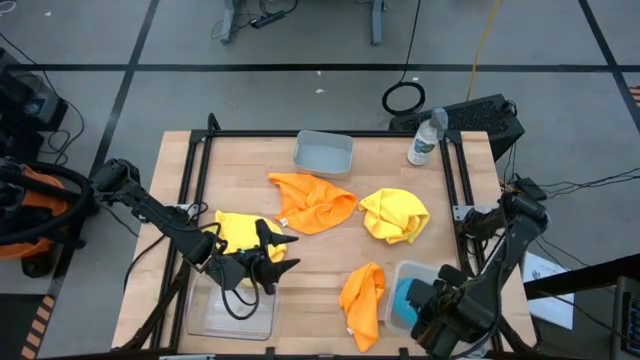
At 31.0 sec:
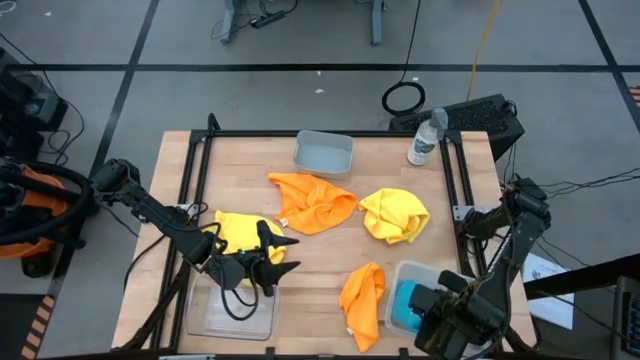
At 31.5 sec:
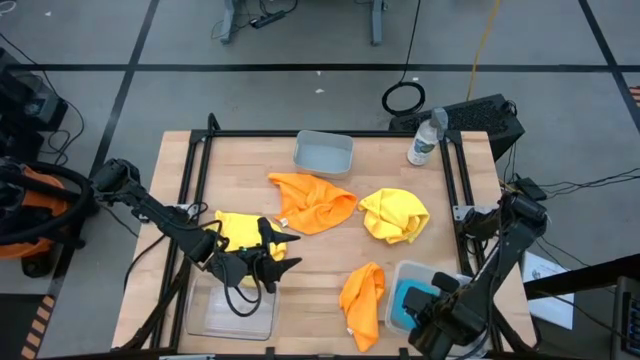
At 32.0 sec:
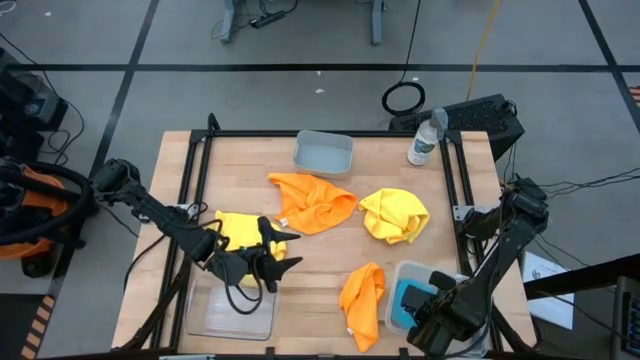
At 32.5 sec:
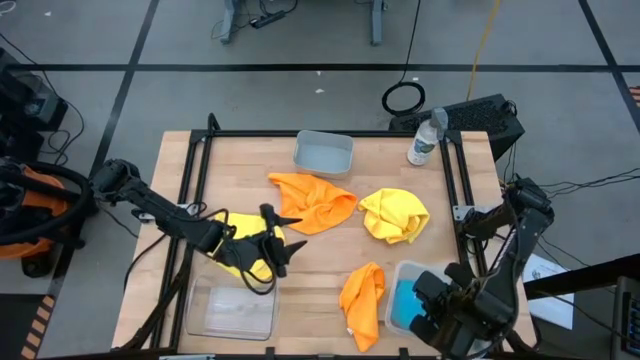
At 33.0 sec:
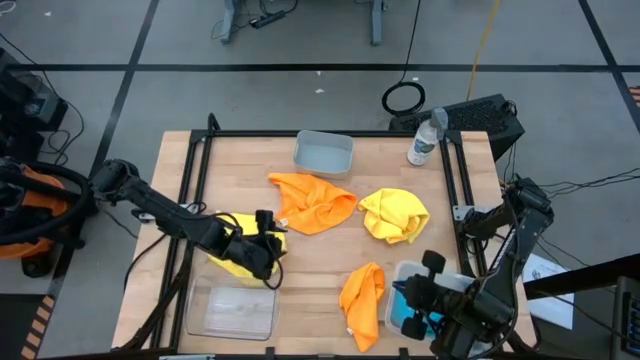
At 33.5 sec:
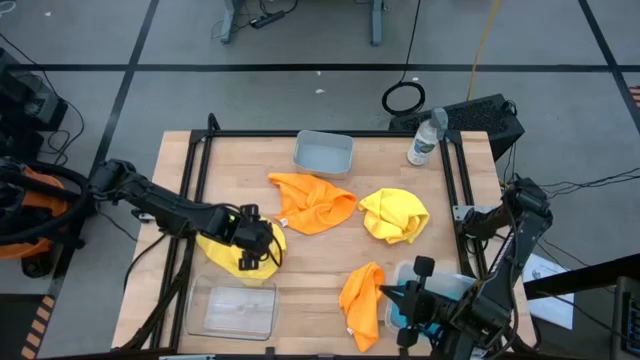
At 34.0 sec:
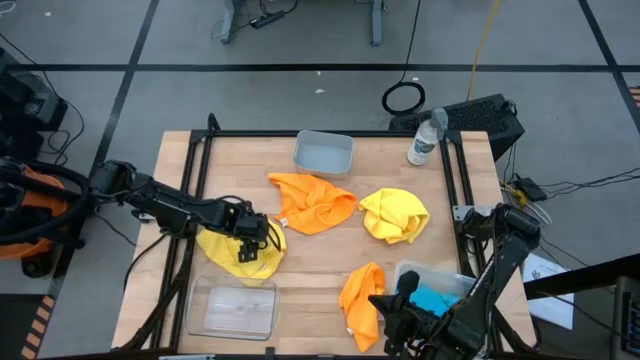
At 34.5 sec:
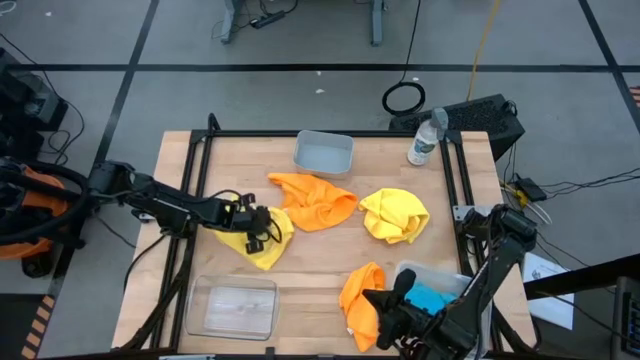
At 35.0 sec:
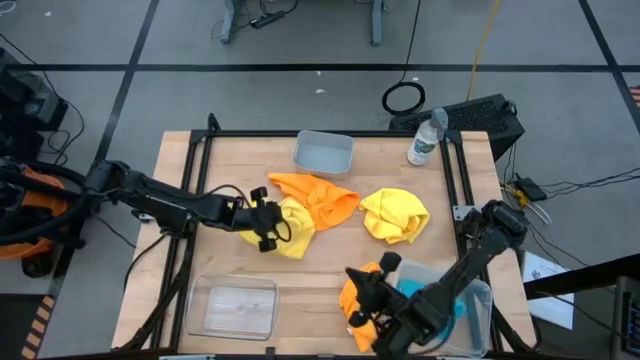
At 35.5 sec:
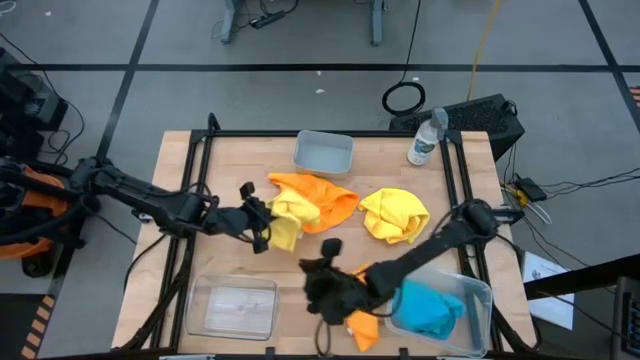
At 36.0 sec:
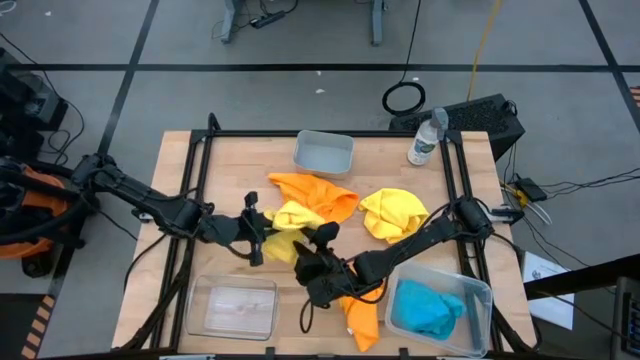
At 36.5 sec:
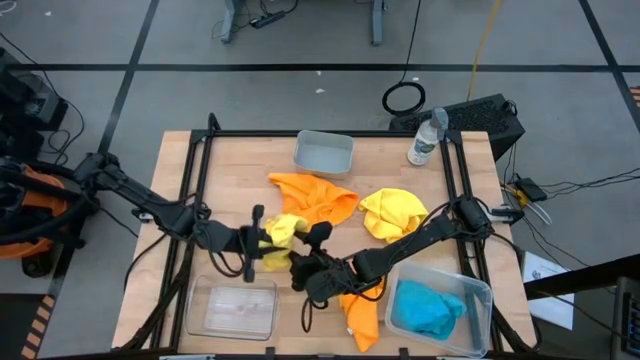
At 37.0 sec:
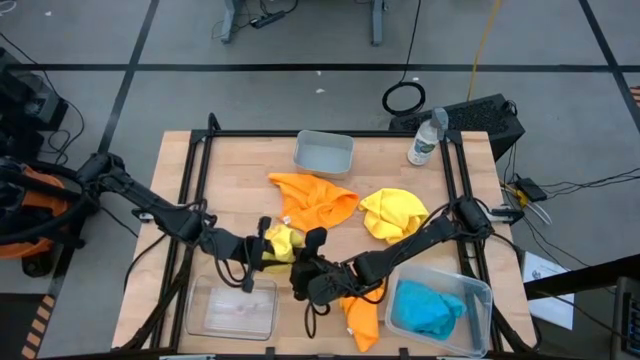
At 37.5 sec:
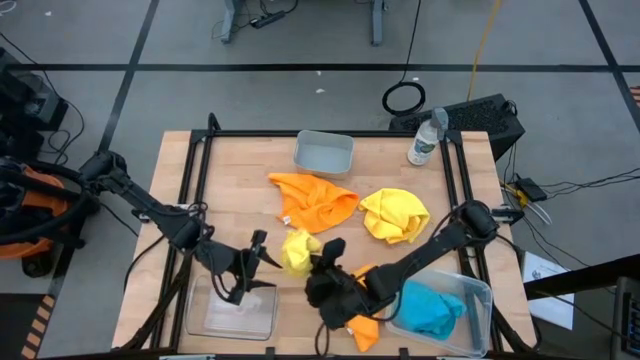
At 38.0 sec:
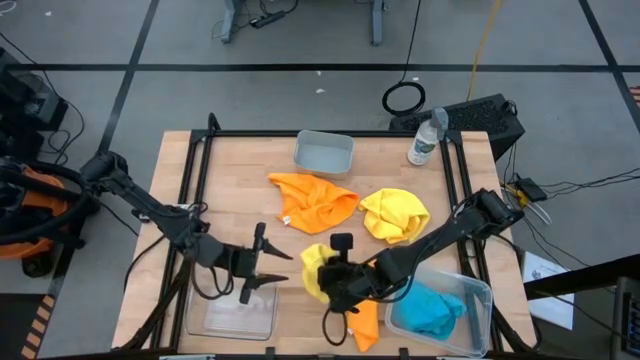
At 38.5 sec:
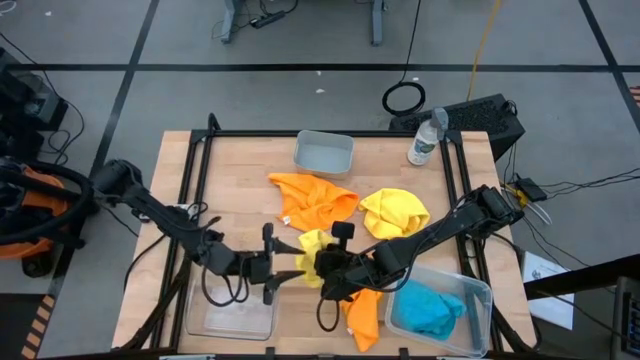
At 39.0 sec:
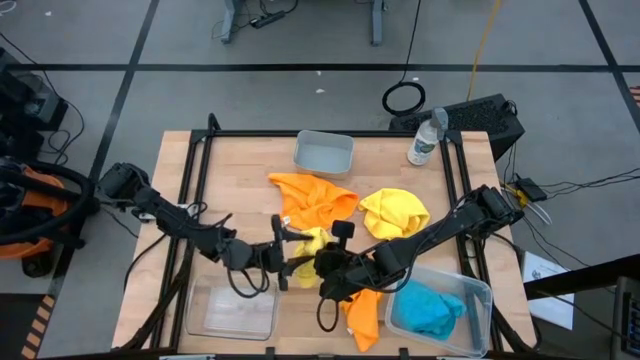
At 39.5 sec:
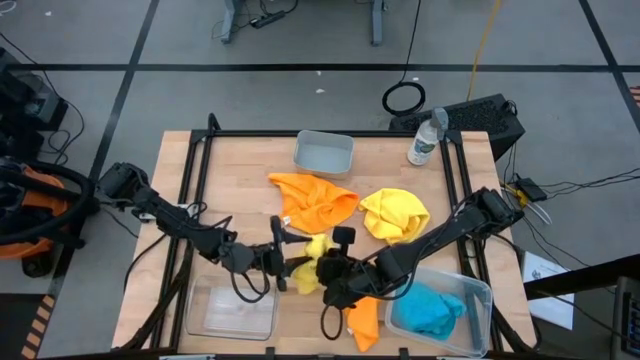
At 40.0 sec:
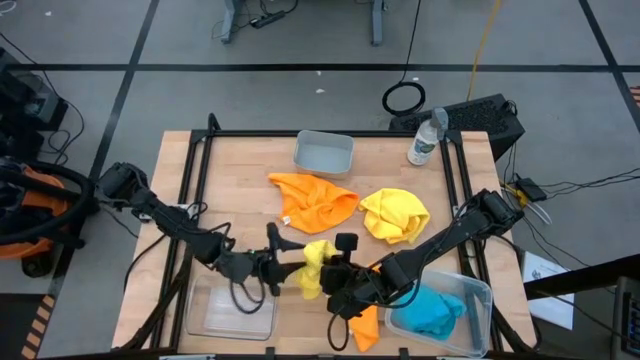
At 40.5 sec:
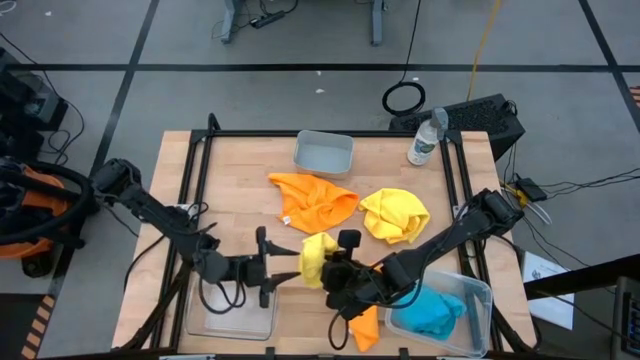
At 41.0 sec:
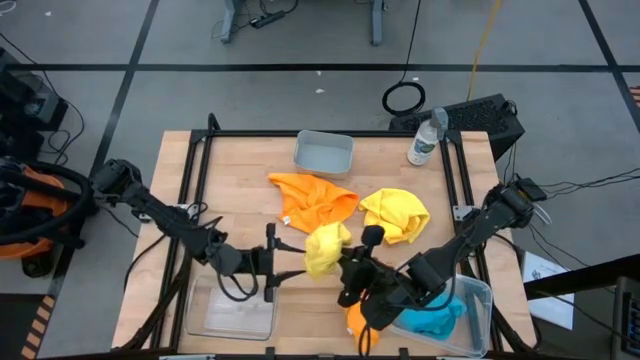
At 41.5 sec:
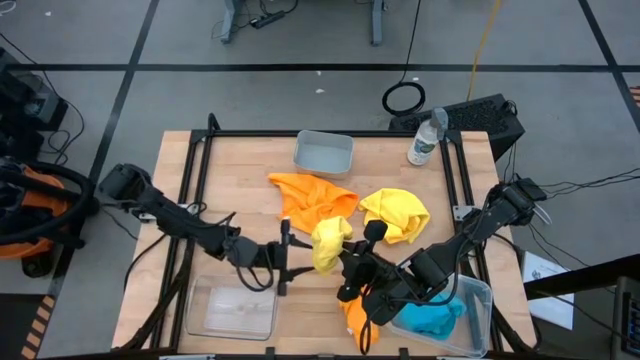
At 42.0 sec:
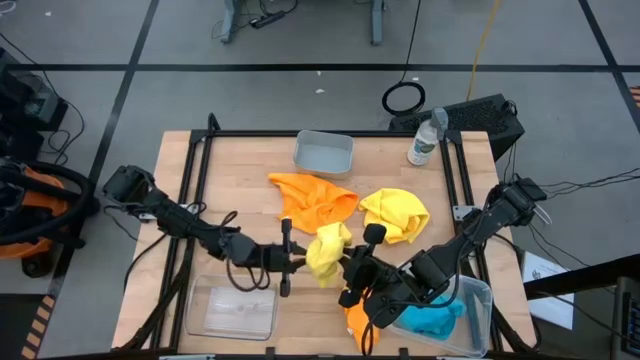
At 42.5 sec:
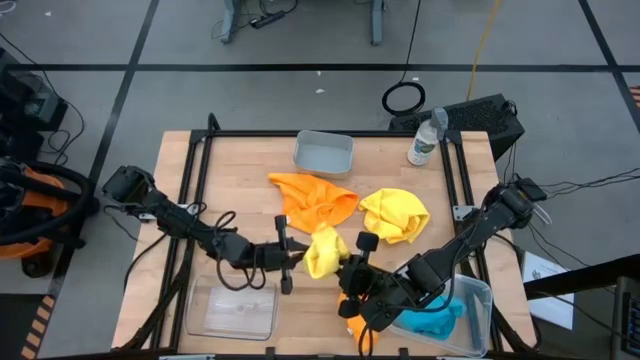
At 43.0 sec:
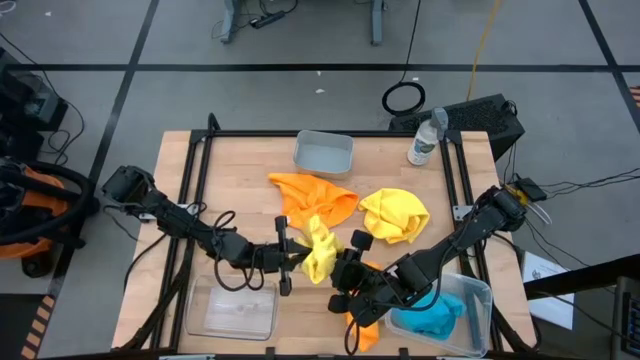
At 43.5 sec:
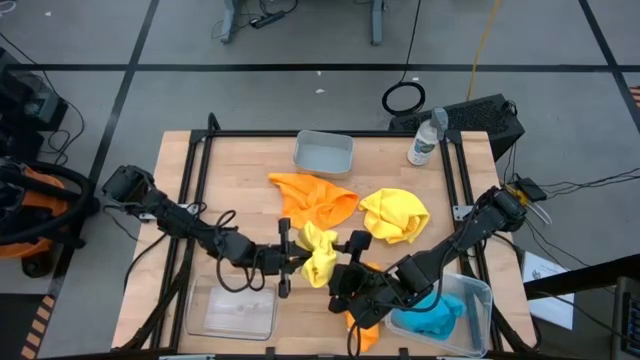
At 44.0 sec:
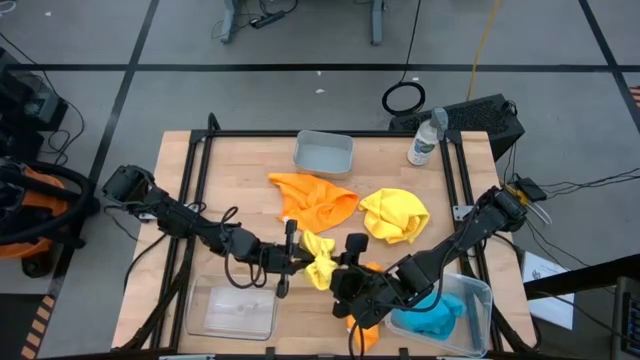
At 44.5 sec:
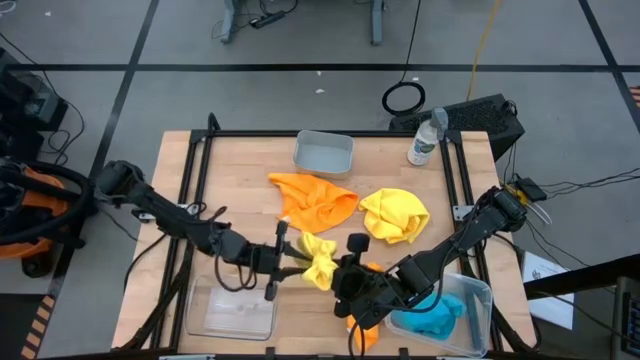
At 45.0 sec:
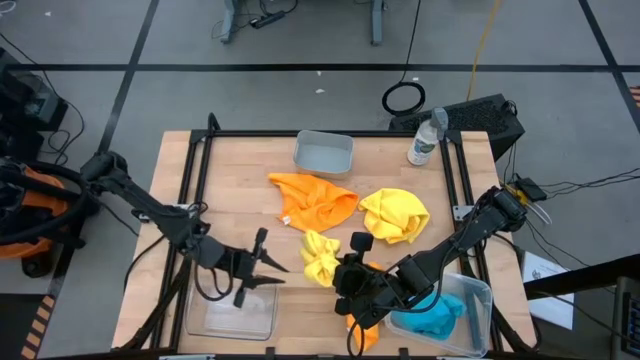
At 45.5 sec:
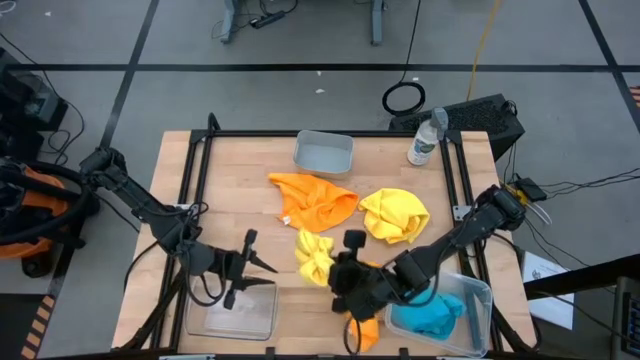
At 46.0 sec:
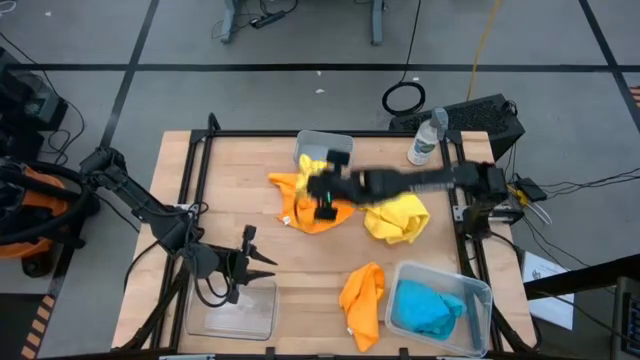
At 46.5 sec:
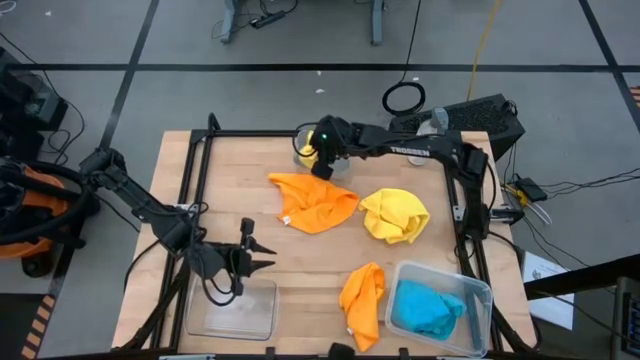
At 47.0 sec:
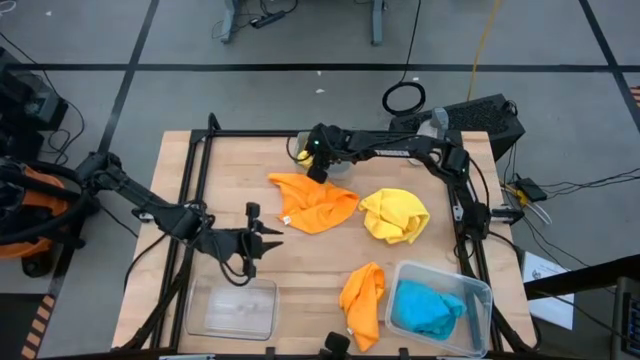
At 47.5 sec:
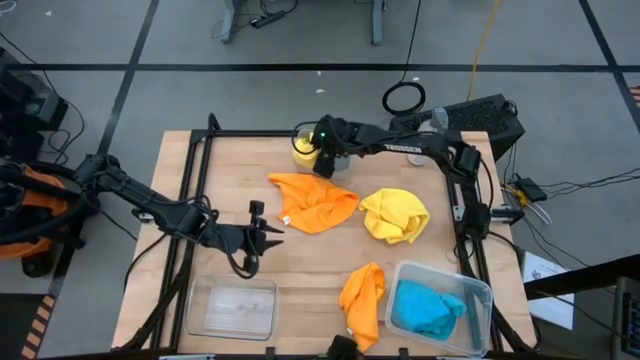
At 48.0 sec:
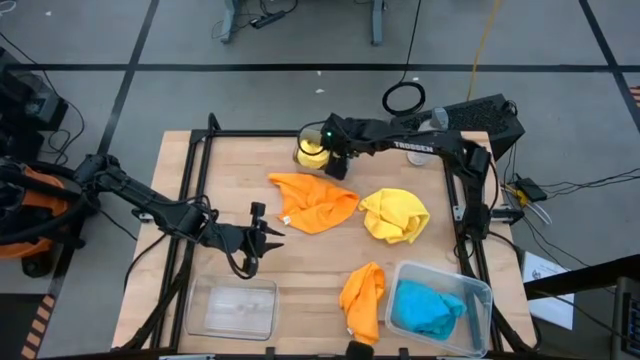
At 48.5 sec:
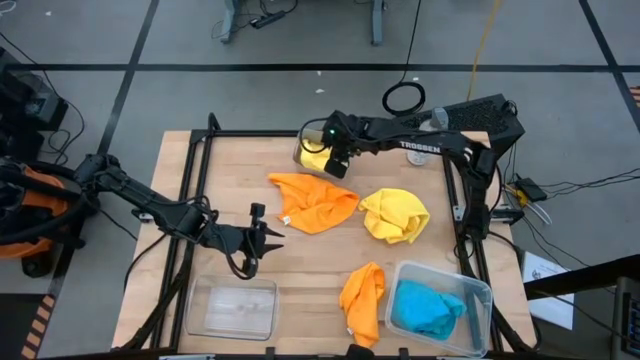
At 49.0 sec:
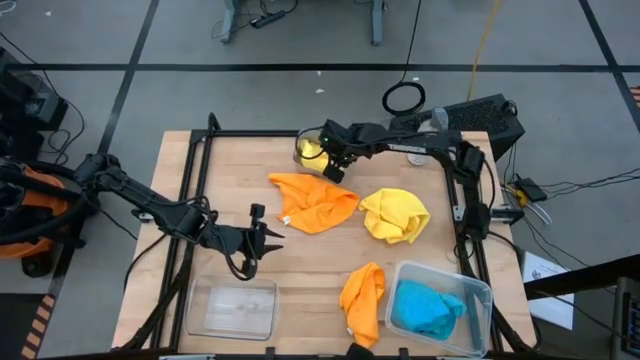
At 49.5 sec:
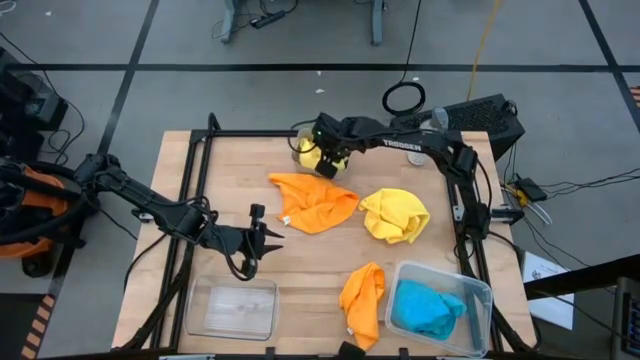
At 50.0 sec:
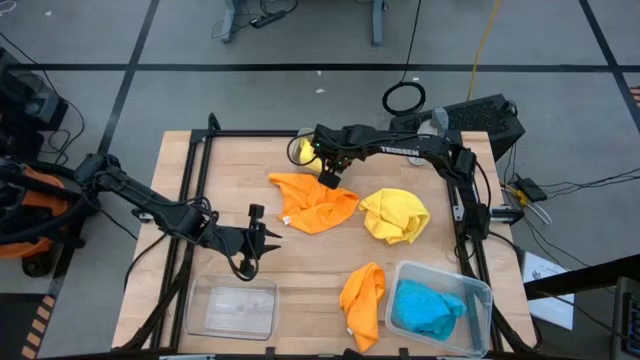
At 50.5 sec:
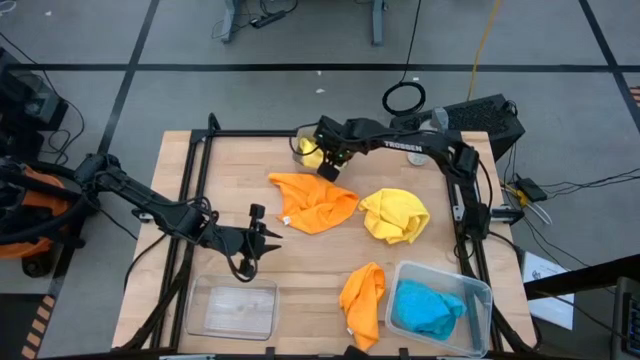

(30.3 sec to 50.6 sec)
Task: Sort microfiber towel by color & place in baskets
Put the left yellow microfiber cloth into the gray bin
